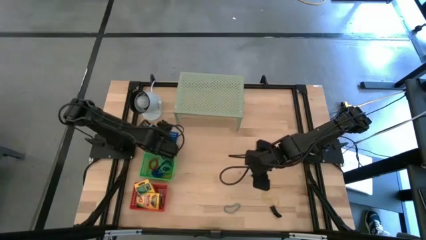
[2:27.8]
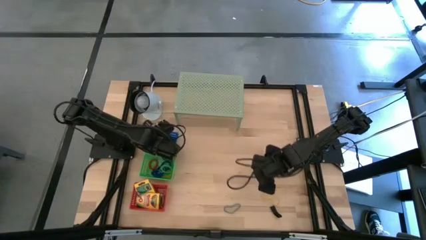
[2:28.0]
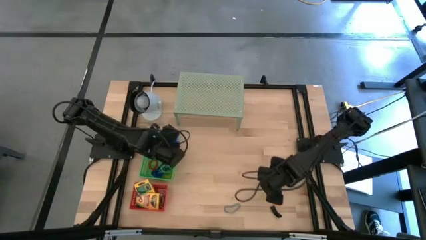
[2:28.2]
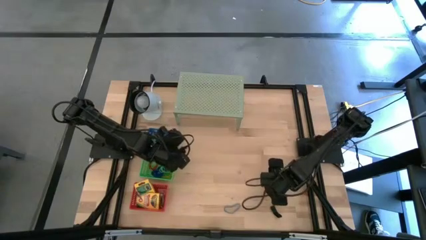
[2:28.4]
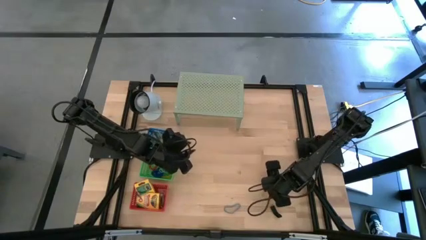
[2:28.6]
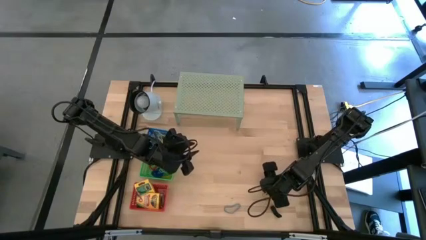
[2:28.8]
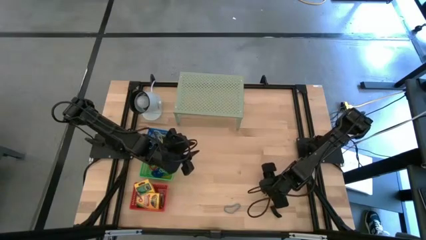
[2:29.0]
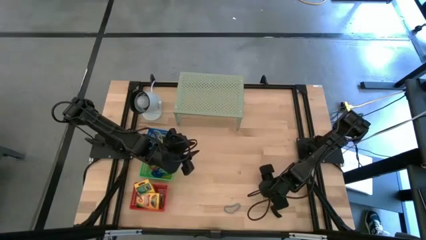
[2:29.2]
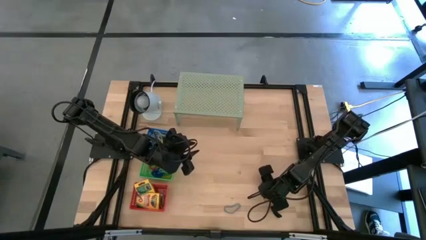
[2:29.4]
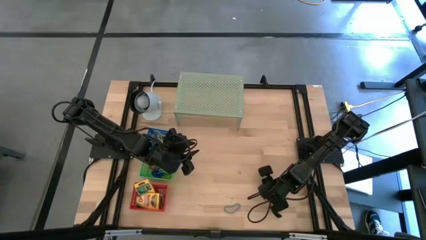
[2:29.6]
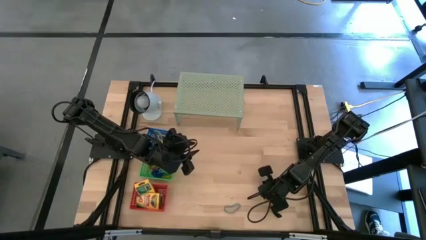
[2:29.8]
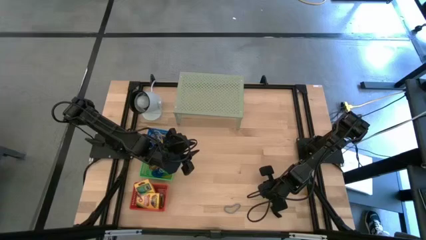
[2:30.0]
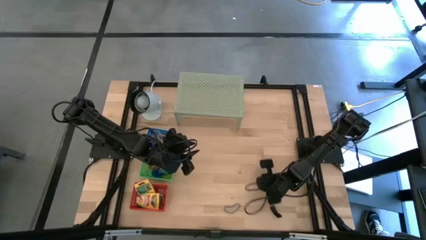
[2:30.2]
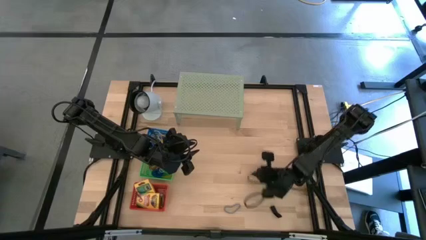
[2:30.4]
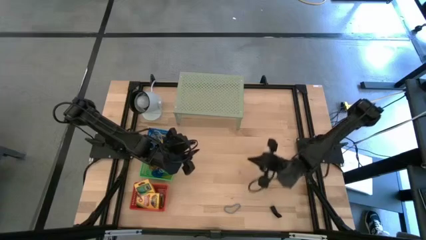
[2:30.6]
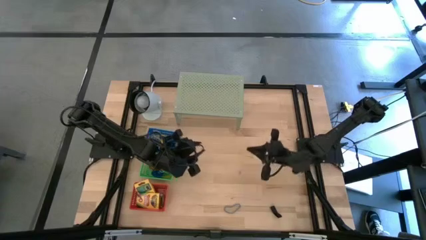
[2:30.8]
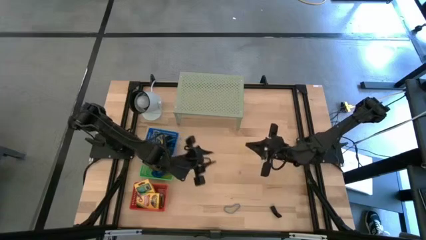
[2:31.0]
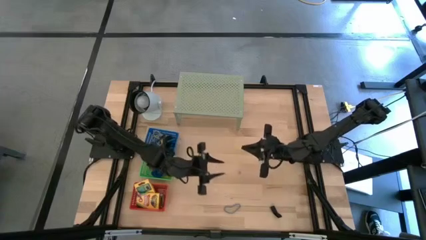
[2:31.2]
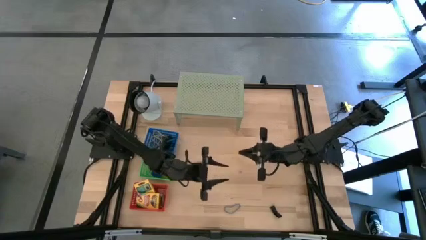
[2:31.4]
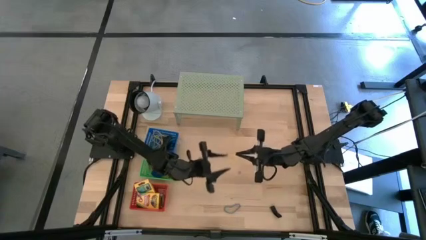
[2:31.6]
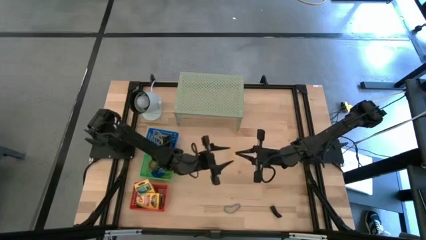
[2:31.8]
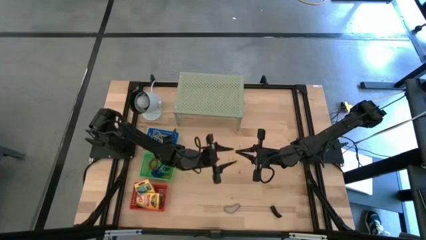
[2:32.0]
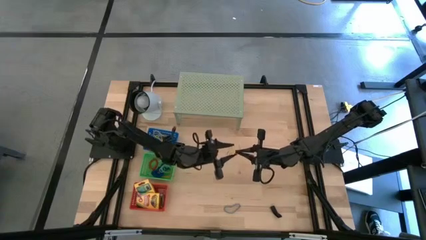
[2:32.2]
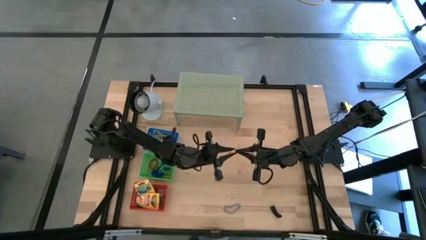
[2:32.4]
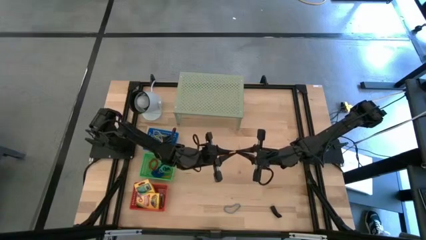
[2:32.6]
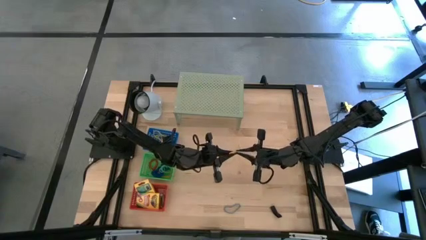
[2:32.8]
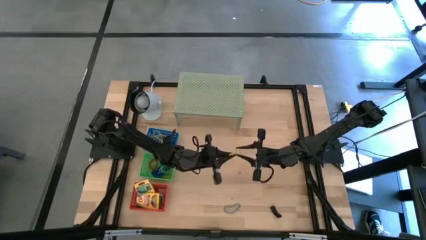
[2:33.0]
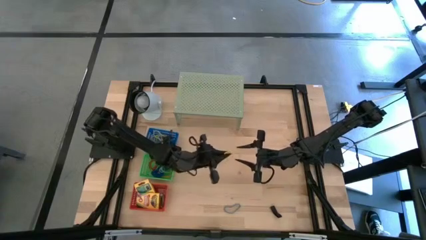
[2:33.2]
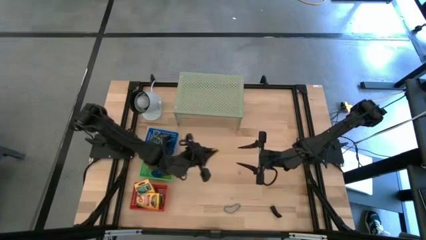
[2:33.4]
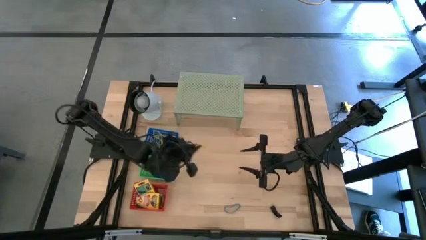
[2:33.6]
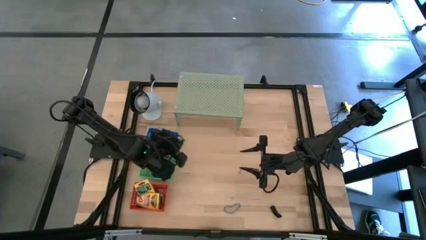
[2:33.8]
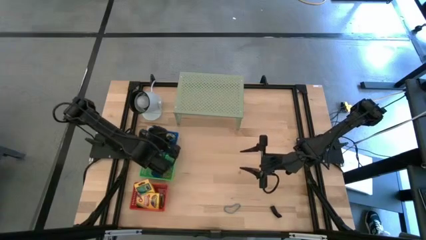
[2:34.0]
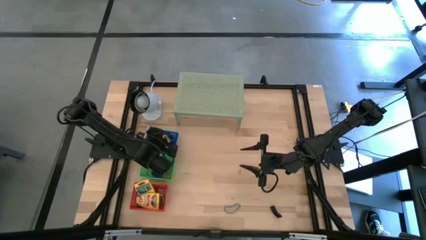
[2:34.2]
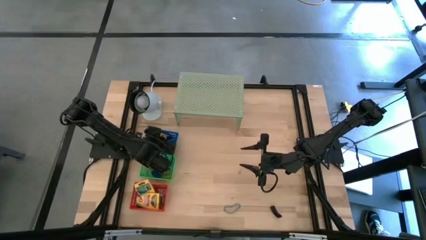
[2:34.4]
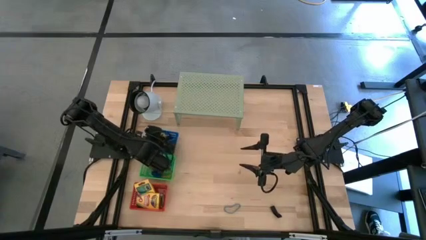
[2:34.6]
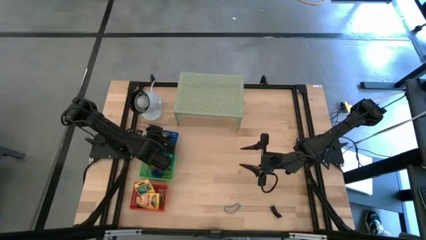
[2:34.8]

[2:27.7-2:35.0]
Task: Pick & Place Office Desk Supplies
Put the yellow rubber band into the blue bin

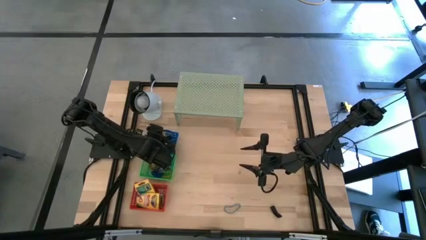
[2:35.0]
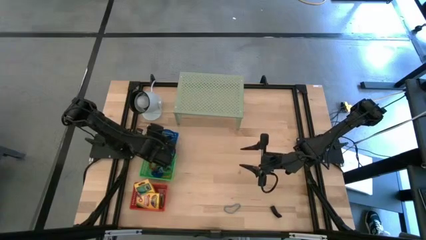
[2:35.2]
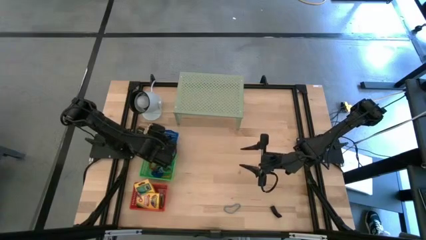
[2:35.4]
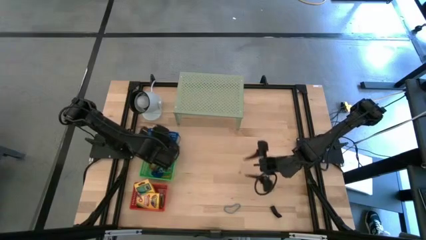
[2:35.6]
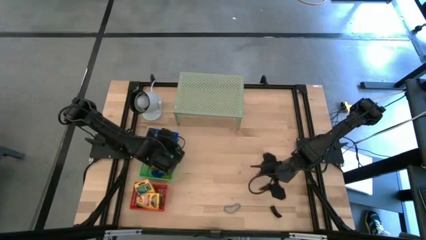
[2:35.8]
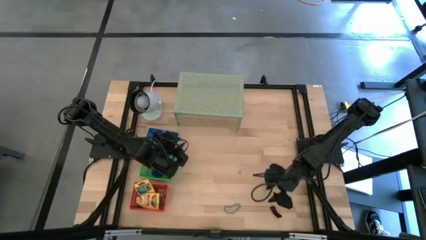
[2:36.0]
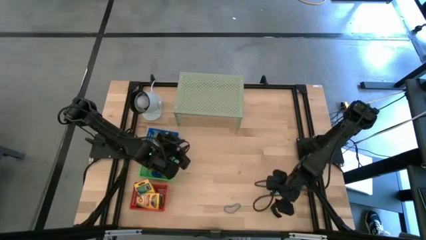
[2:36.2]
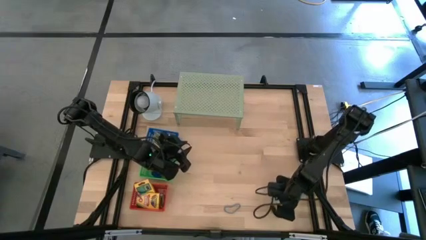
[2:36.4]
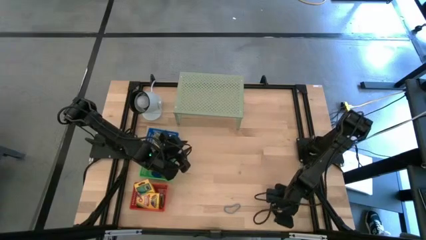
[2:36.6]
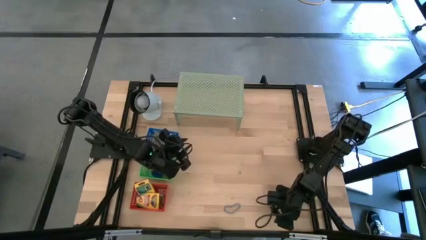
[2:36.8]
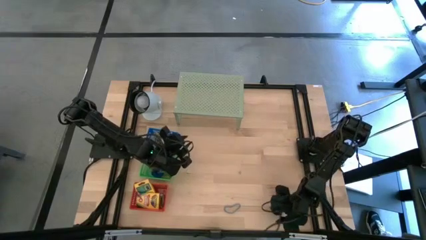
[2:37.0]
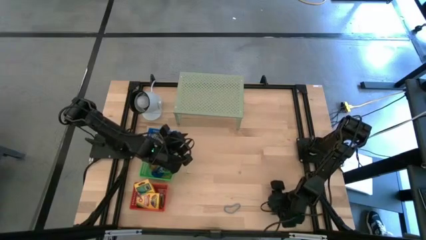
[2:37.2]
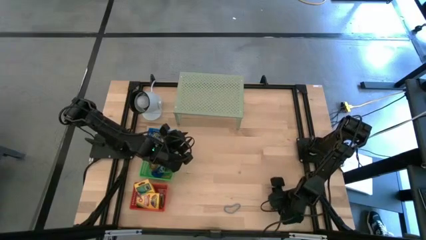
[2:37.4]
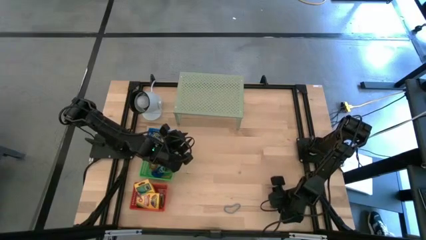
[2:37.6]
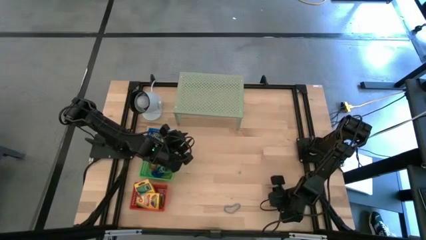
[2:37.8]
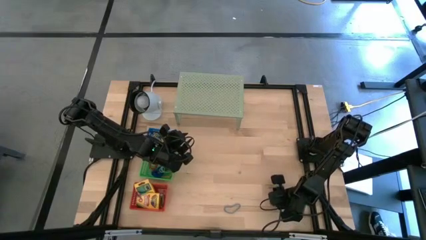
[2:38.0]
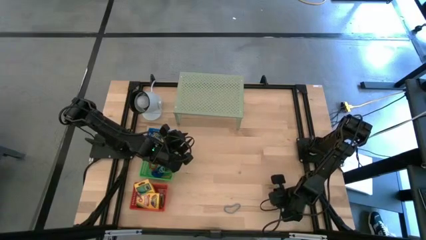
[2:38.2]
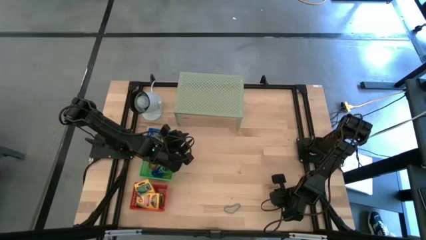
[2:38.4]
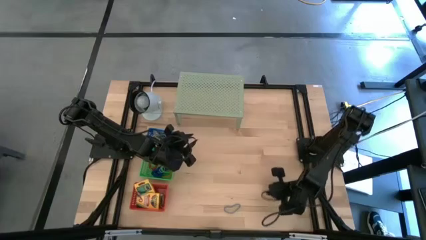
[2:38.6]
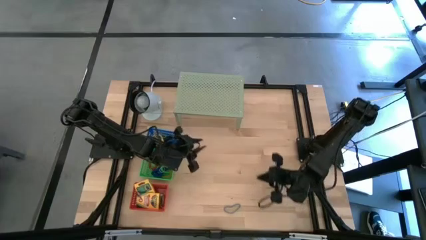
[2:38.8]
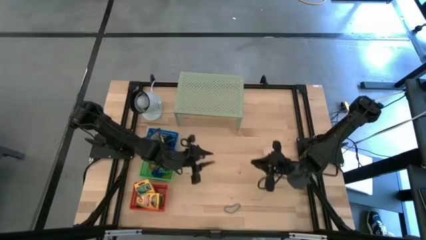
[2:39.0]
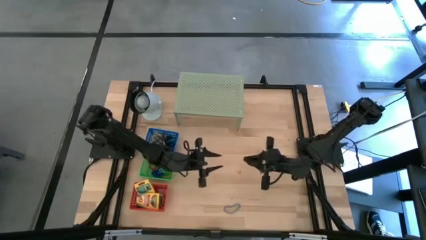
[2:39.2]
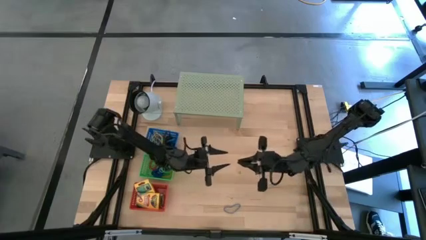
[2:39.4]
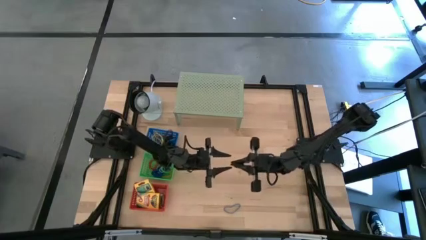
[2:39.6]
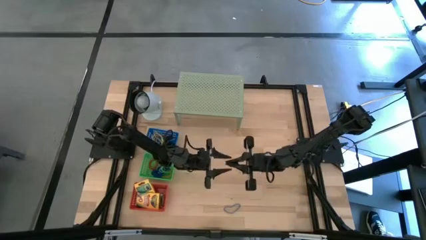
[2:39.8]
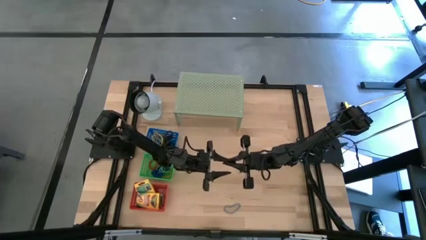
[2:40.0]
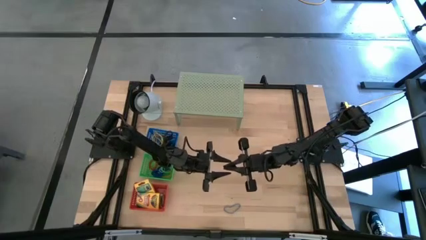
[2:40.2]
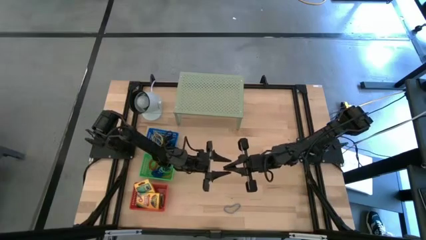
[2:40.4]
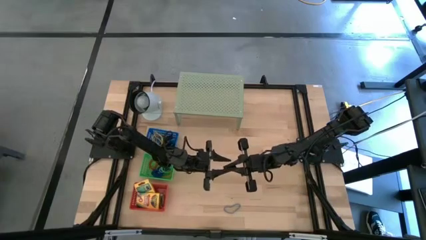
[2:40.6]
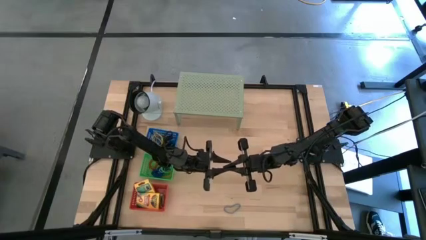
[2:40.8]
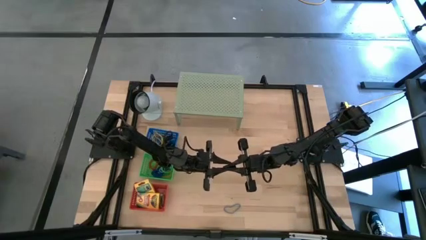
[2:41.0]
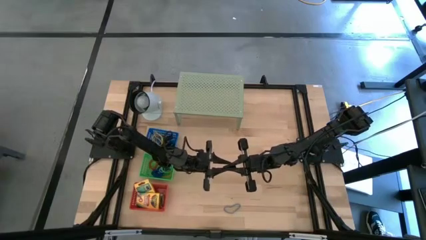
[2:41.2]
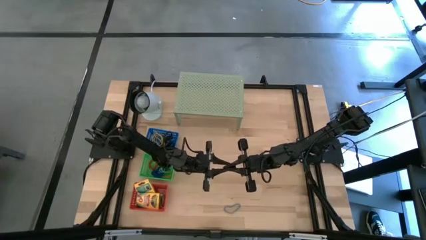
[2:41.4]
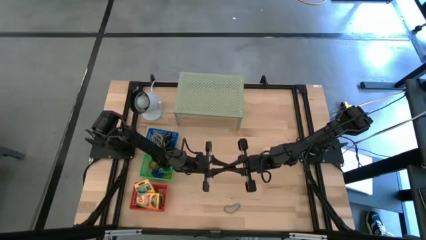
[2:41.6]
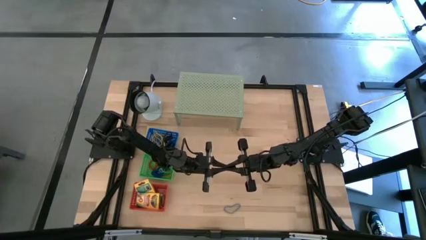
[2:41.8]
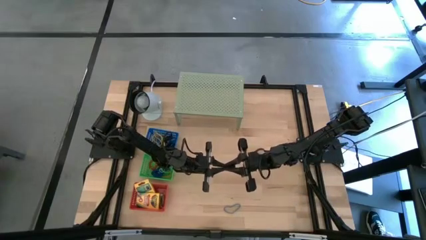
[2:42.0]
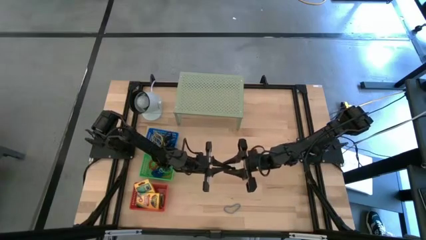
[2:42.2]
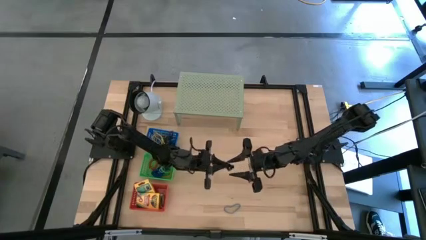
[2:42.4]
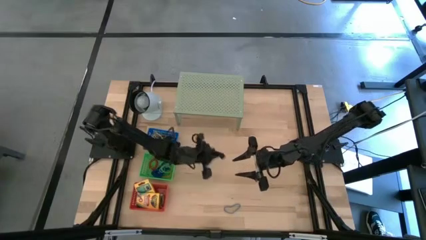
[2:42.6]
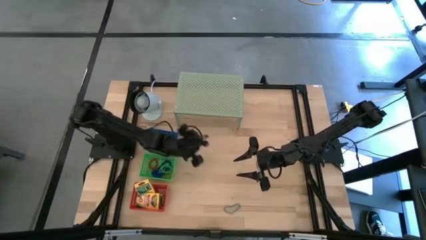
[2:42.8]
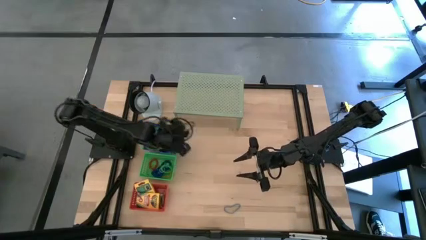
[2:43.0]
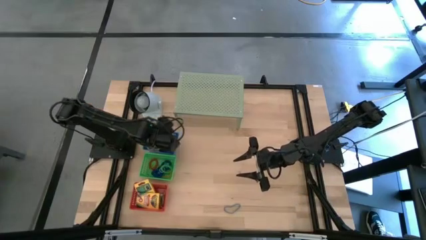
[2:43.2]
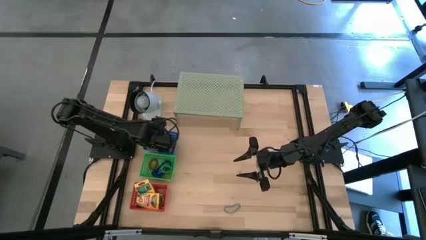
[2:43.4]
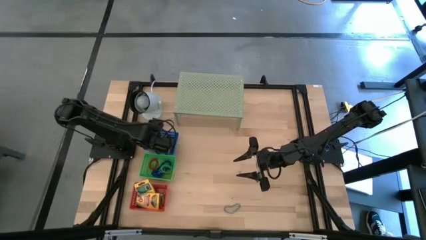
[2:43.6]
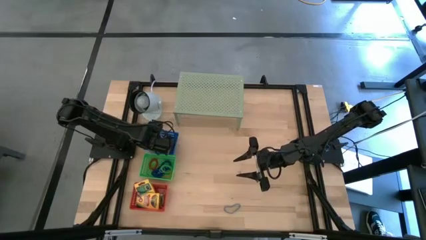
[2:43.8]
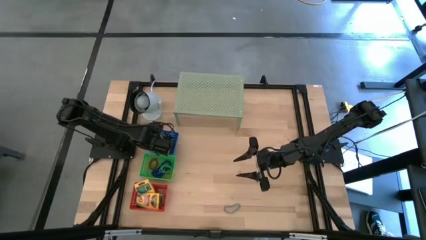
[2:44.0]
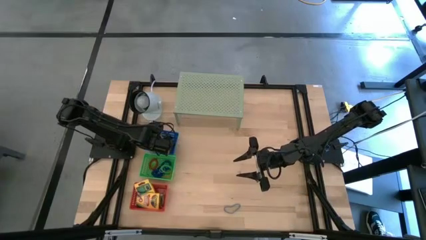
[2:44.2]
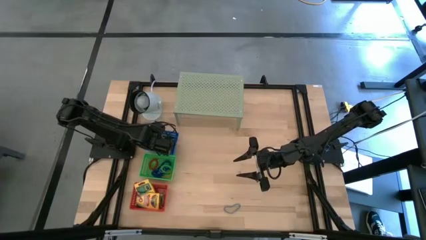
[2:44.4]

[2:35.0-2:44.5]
Put the black rubber band into the blue bin

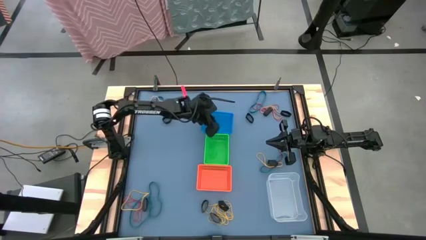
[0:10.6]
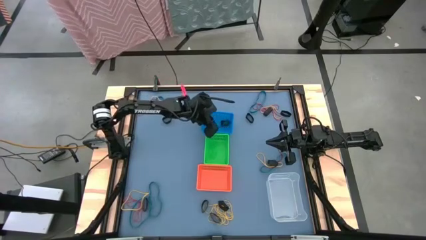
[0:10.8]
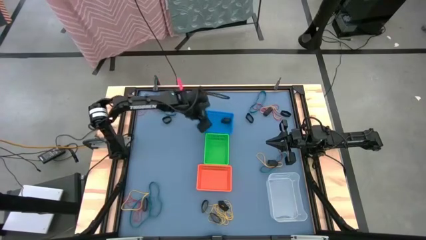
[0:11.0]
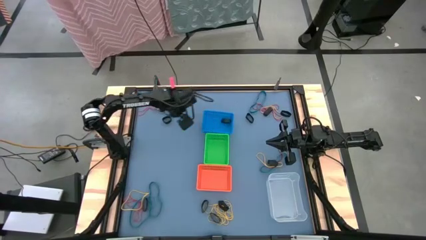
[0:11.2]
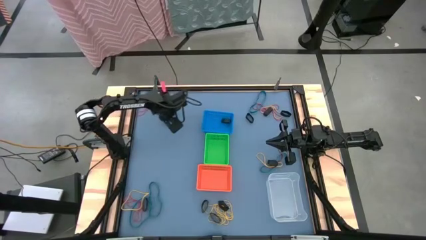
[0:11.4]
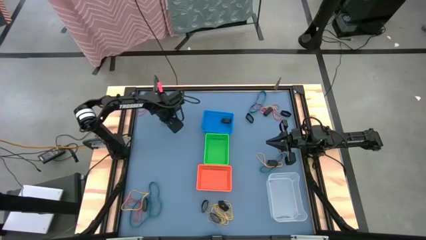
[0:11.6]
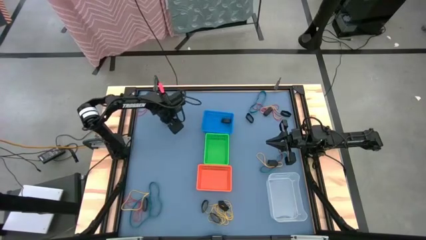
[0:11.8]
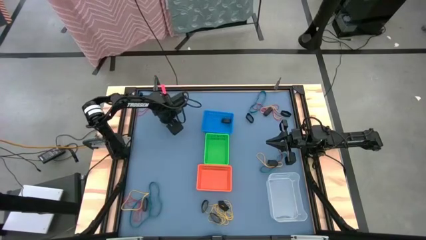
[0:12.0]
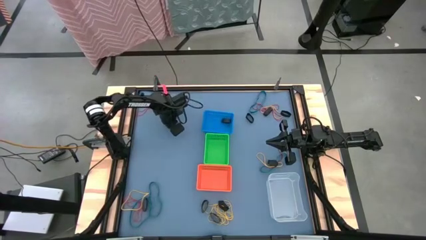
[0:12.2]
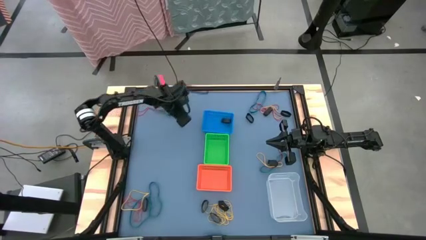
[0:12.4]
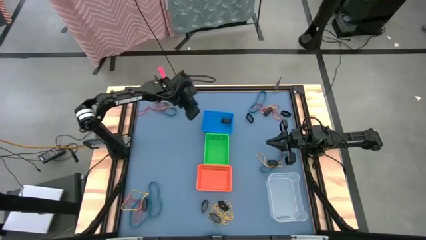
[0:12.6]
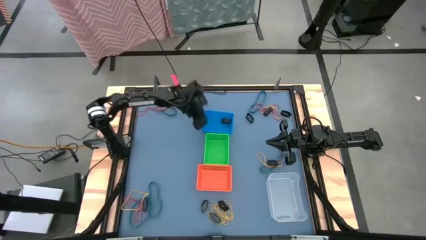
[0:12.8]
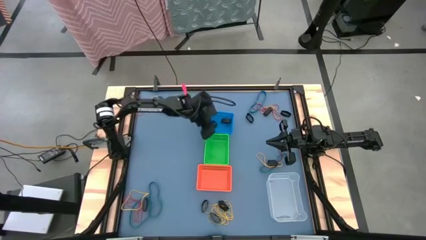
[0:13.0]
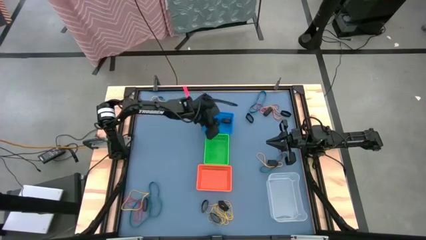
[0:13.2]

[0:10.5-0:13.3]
Task: Sort rubber bands into baskets
Put the black rubber band into the blue bin
